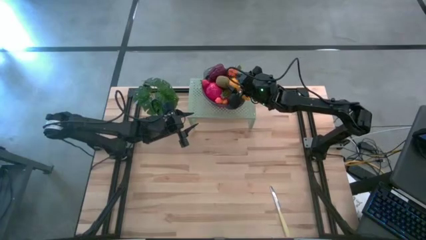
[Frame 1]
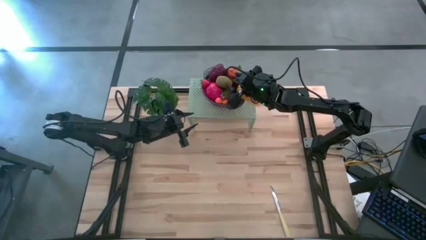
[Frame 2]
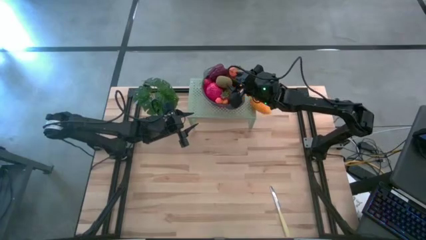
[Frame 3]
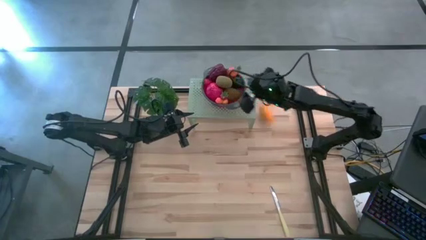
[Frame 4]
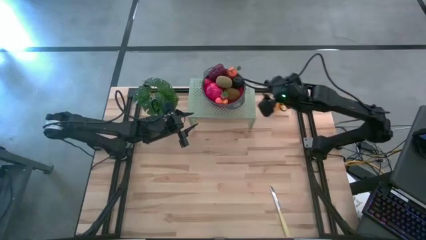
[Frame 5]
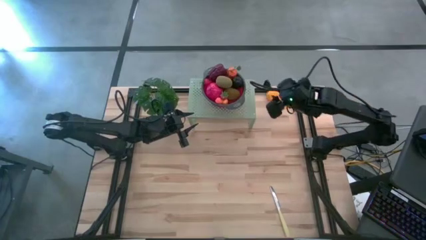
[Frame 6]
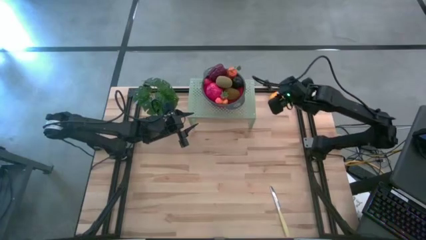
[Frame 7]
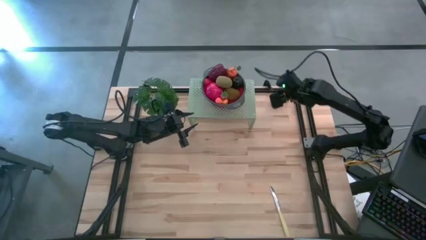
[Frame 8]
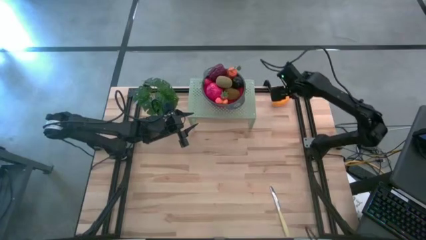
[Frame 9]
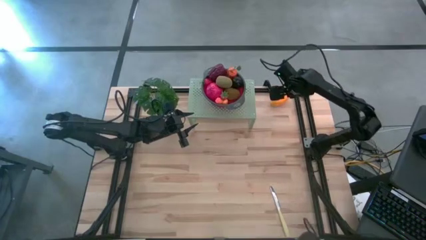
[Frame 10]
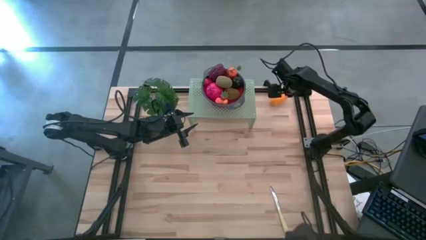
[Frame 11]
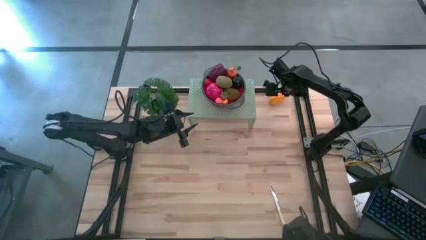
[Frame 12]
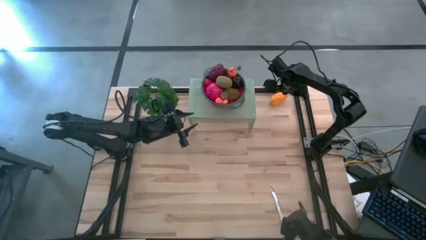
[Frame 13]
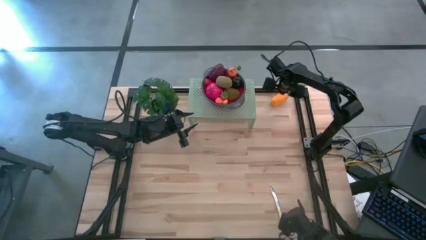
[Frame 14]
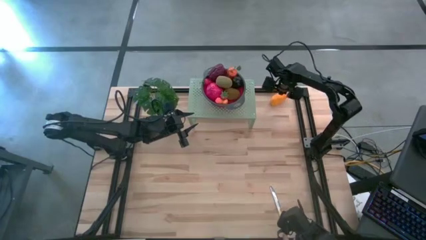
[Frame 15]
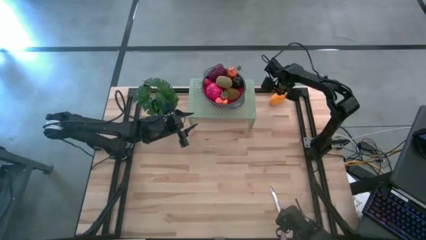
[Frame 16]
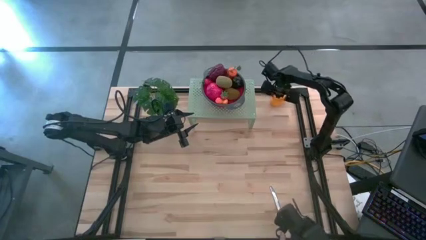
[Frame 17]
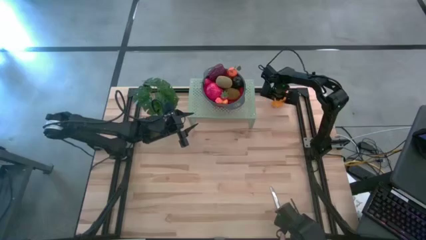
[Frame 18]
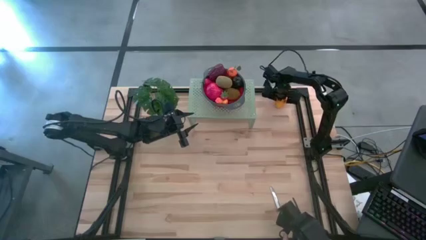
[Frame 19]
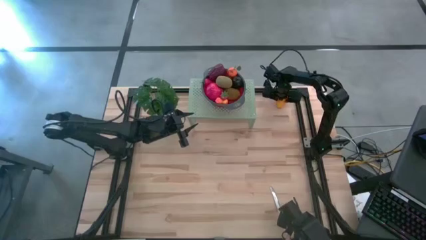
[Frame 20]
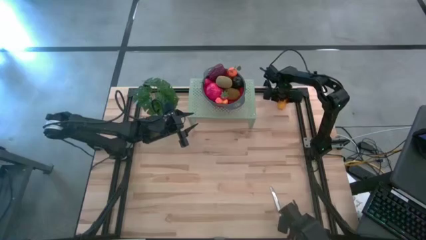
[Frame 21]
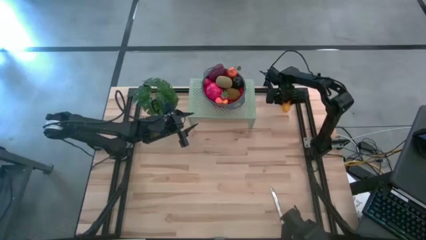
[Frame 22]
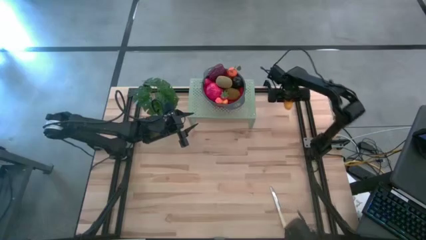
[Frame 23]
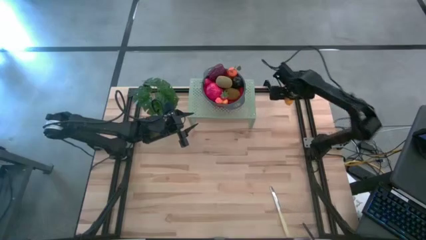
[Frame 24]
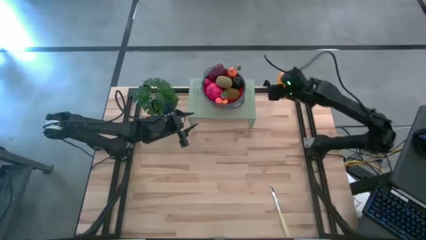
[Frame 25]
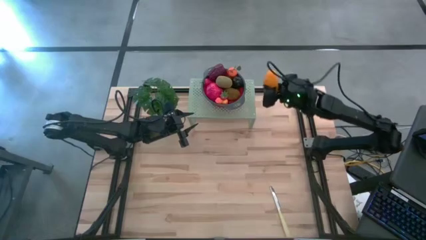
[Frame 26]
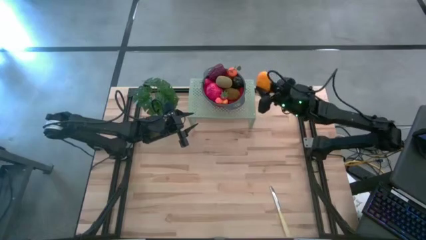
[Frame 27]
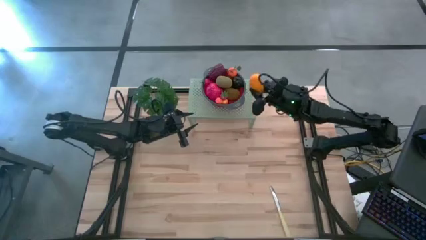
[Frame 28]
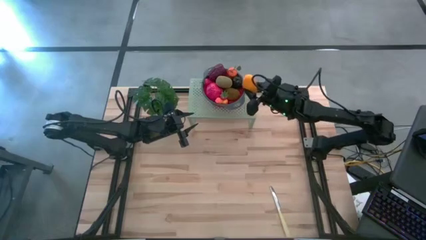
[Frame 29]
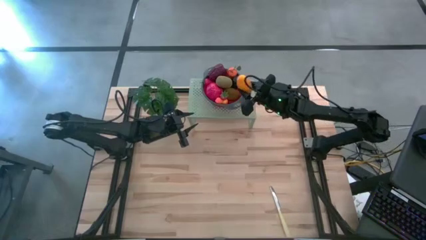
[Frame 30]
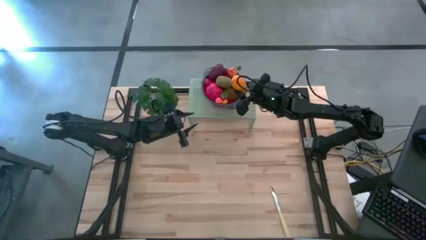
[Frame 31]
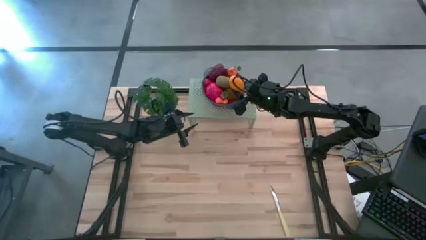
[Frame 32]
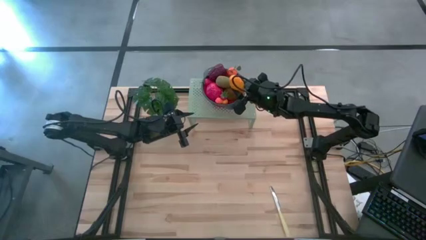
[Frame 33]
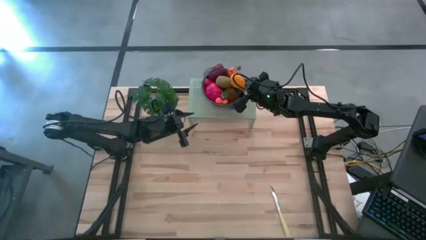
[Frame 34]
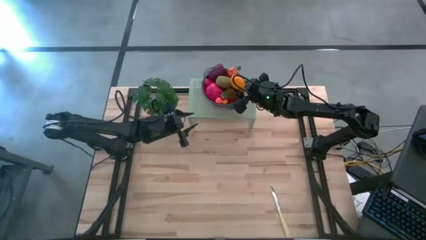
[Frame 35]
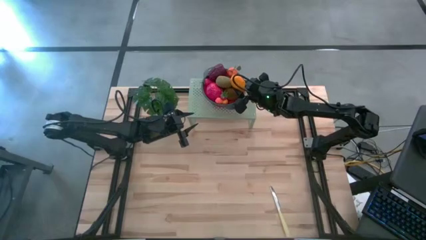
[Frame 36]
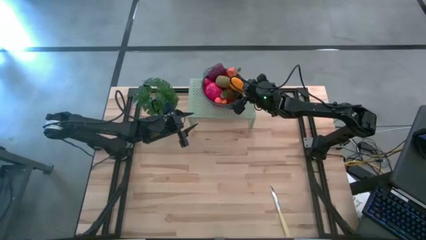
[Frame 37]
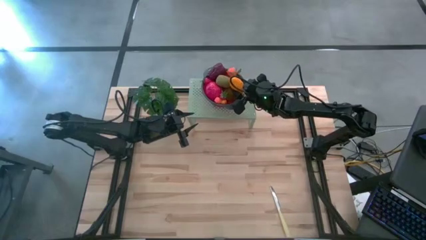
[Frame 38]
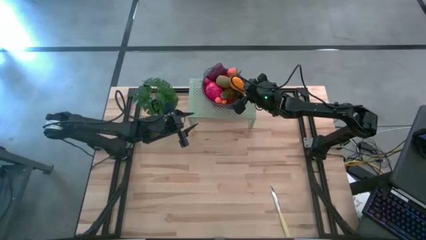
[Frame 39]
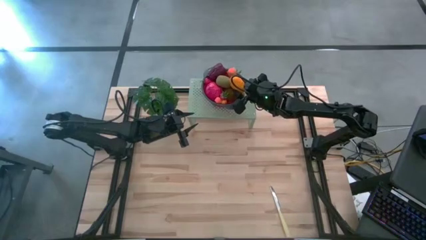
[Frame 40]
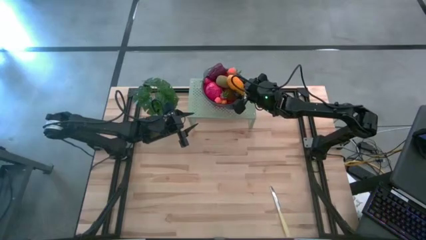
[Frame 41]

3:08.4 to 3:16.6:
Task: Pick & Place Fruit
Put the mango into the red bowl on the shelf

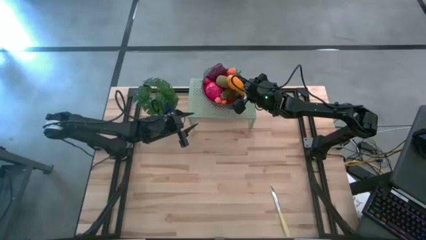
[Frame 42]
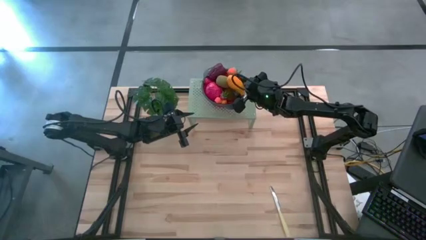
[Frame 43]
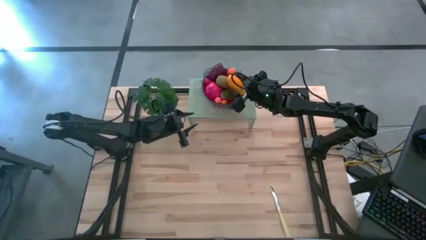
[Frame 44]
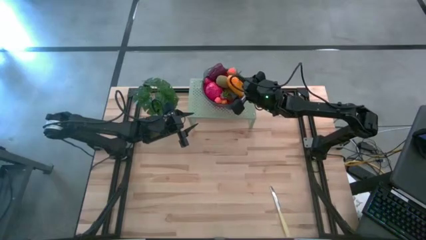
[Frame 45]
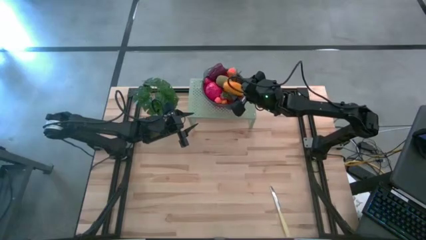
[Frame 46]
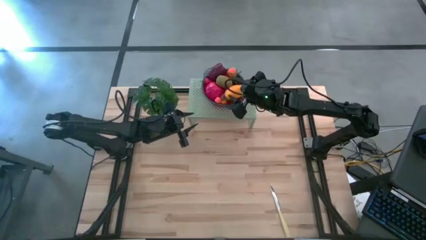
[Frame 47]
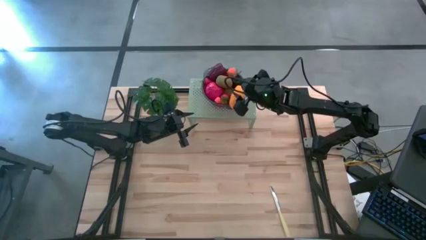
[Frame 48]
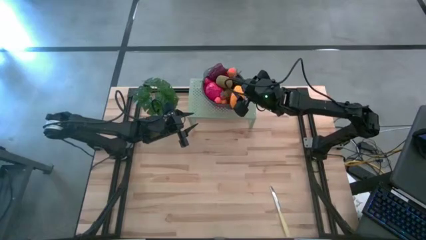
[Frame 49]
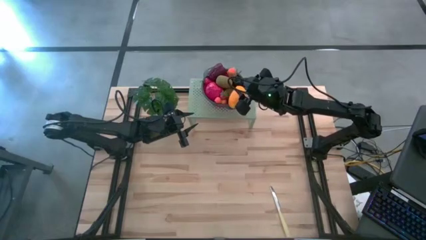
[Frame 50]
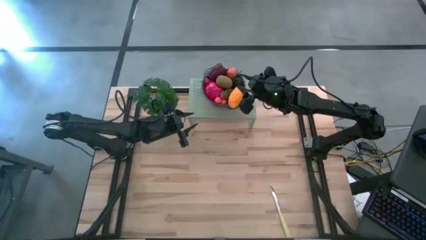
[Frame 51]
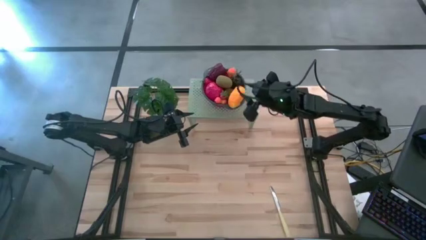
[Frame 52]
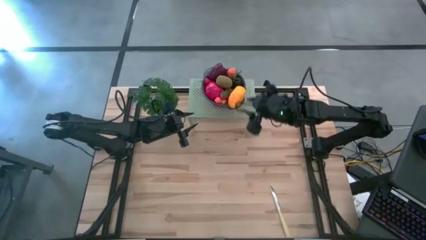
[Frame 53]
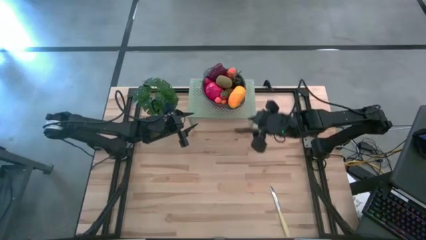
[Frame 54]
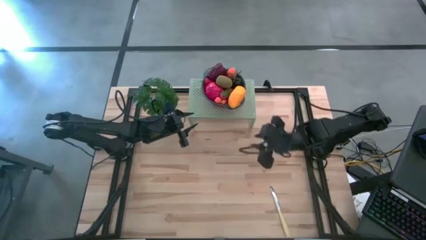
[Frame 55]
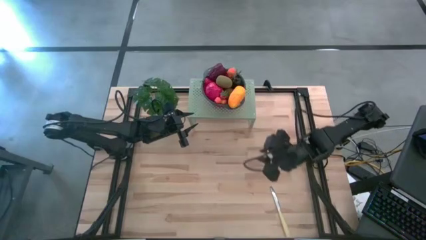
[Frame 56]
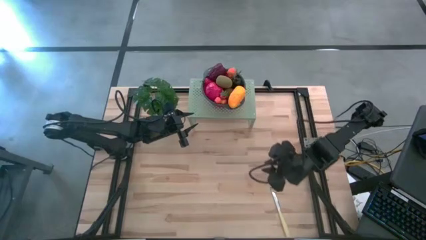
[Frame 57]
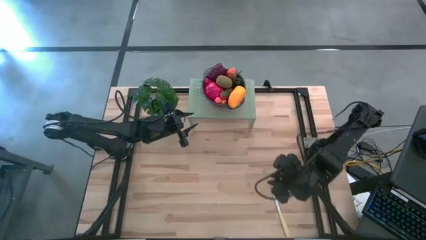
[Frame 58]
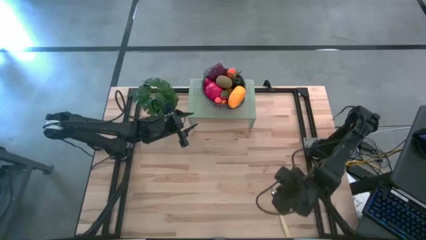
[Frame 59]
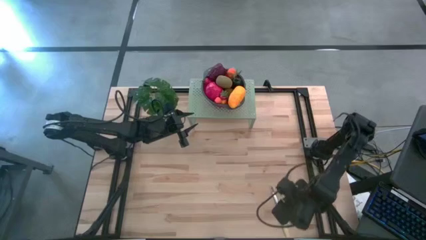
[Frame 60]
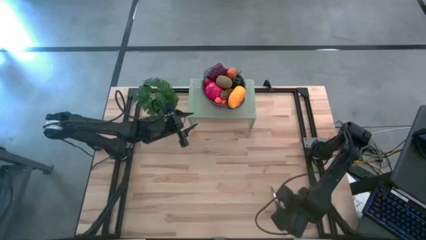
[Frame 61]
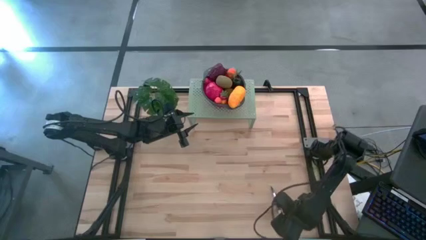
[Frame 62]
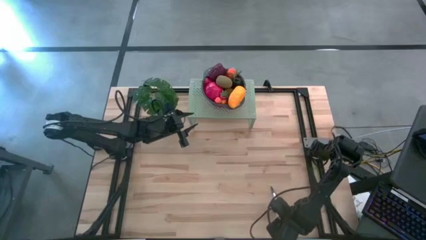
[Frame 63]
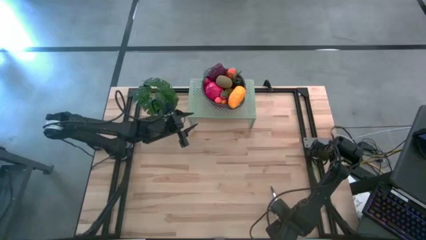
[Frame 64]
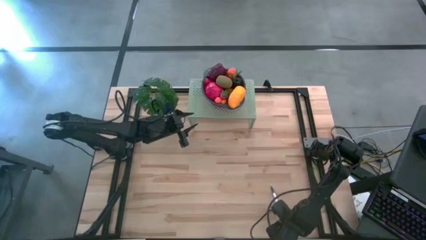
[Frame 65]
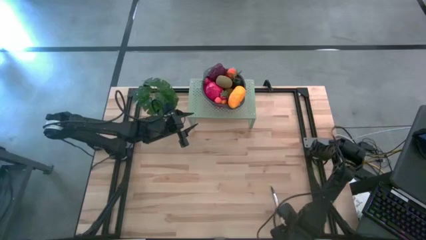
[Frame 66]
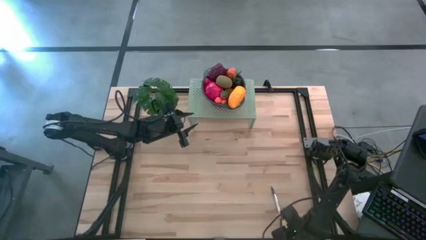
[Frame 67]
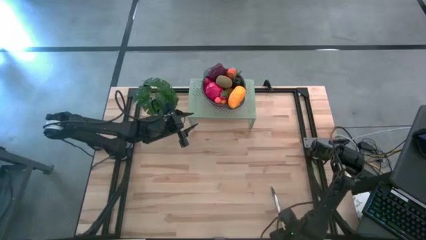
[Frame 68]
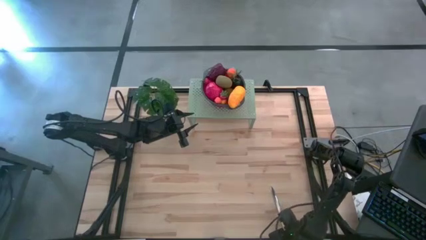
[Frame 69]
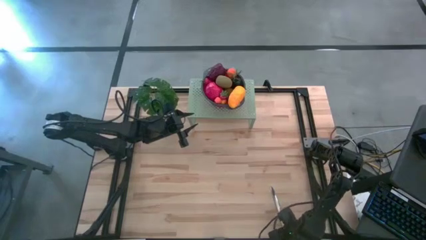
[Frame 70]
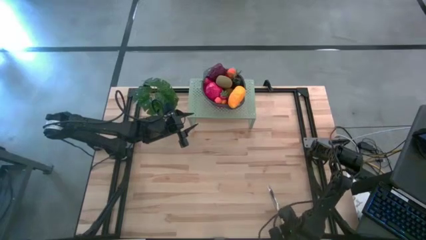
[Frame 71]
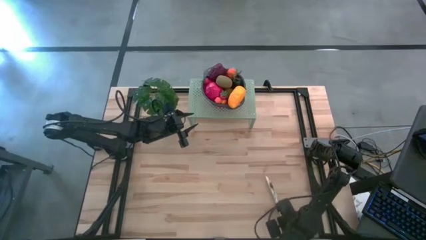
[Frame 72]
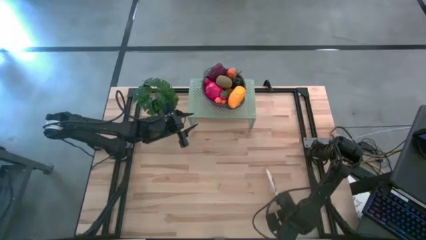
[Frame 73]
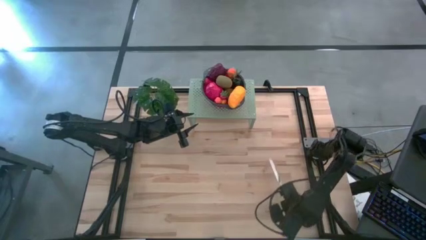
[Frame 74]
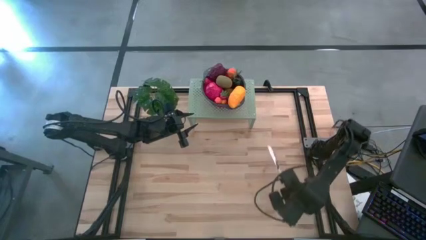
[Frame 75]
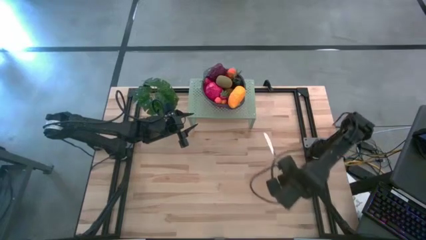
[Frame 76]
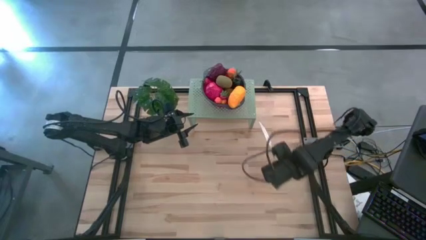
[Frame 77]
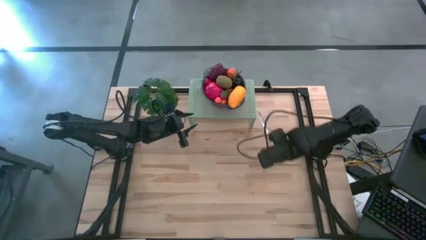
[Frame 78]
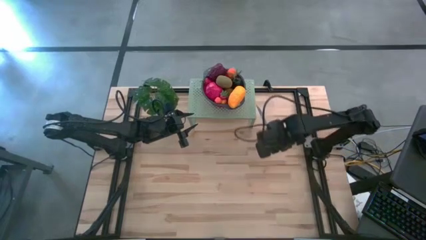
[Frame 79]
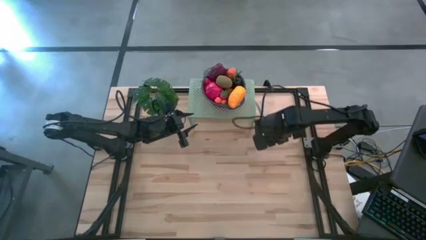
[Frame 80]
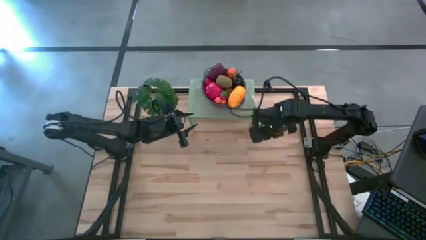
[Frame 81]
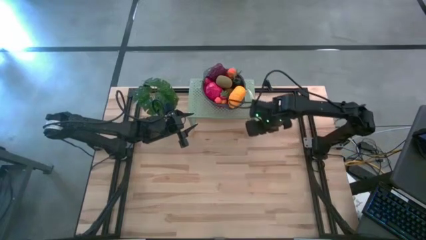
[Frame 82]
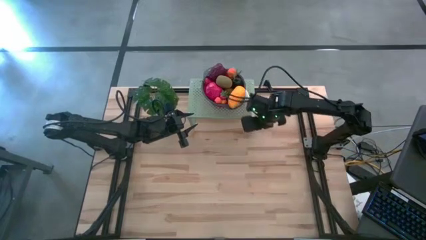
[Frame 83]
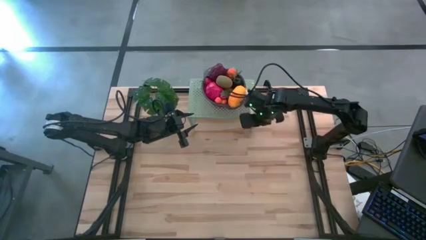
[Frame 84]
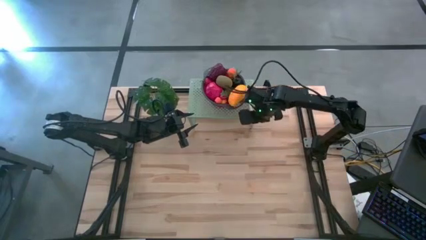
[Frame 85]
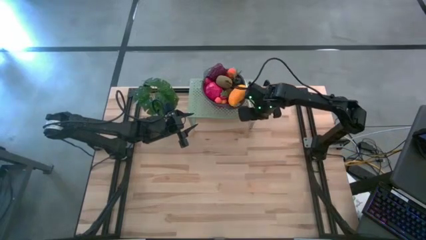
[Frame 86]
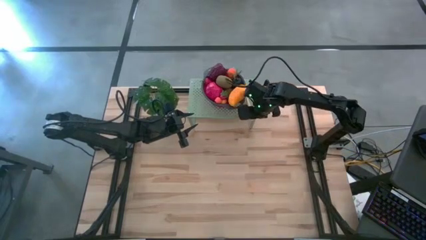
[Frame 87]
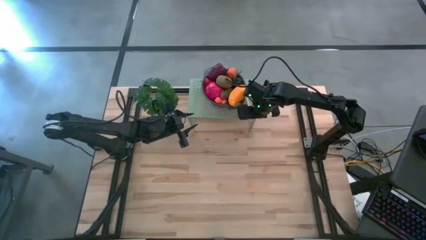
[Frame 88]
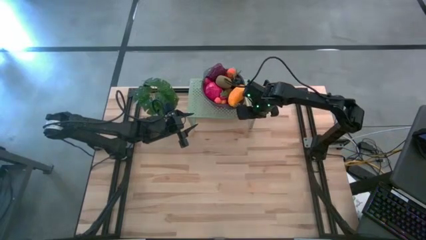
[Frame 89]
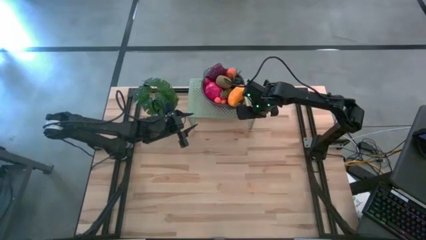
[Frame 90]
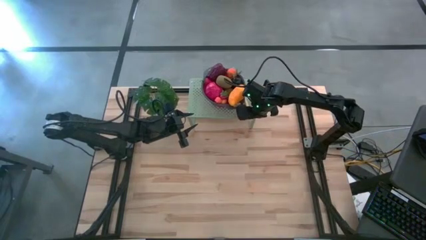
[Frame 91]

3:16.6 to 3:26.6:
Put the yellow table knife on the shelf
